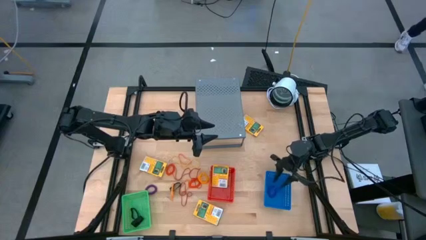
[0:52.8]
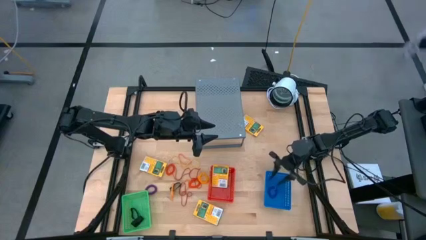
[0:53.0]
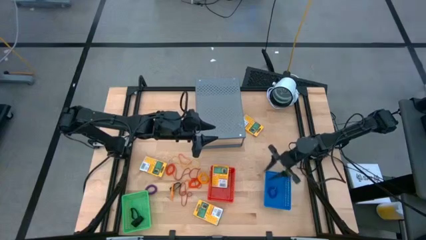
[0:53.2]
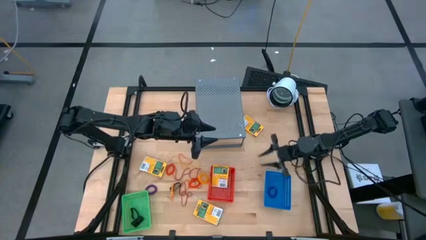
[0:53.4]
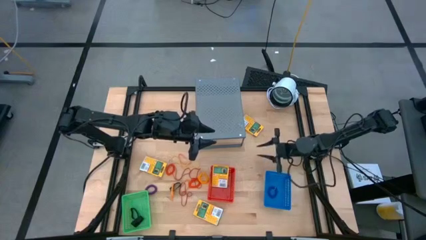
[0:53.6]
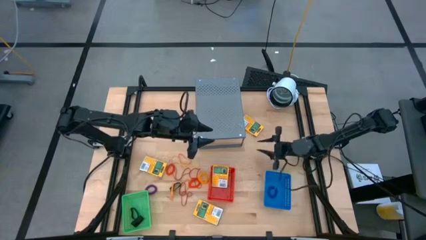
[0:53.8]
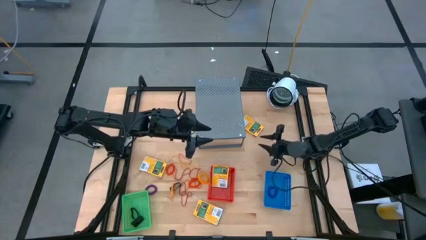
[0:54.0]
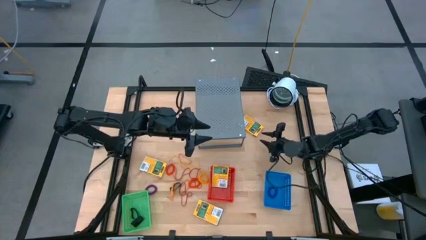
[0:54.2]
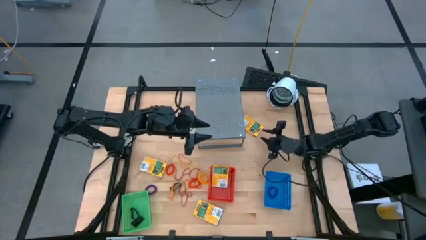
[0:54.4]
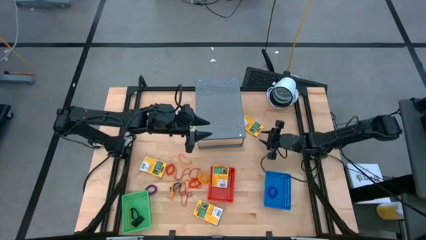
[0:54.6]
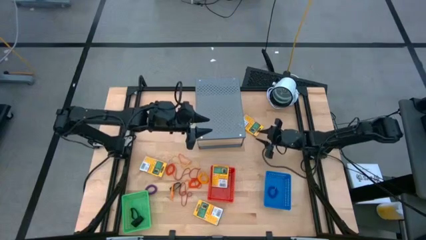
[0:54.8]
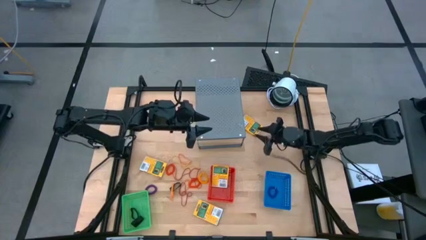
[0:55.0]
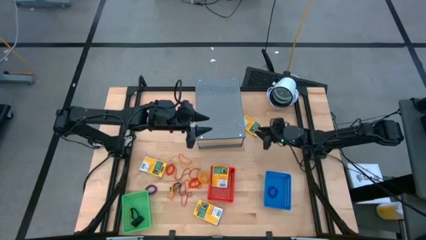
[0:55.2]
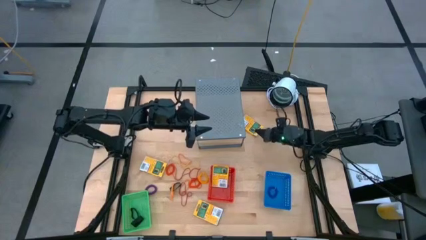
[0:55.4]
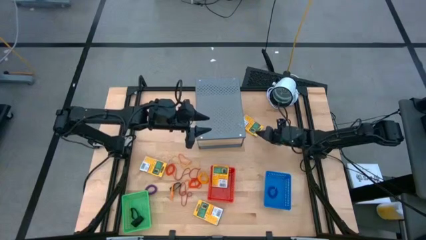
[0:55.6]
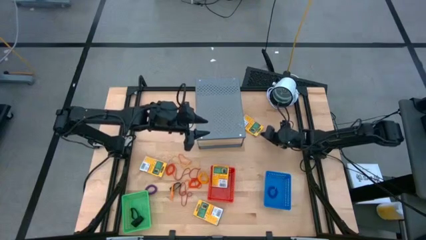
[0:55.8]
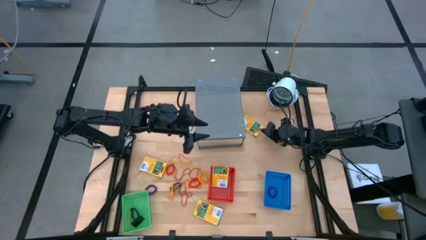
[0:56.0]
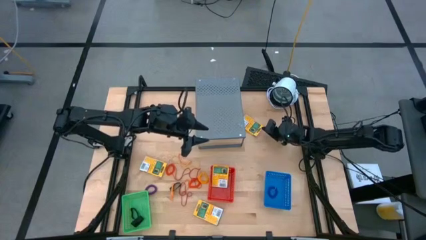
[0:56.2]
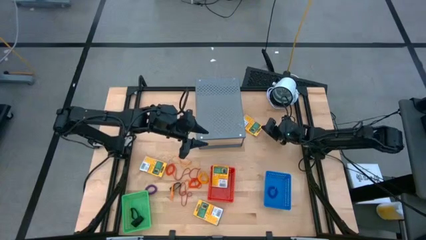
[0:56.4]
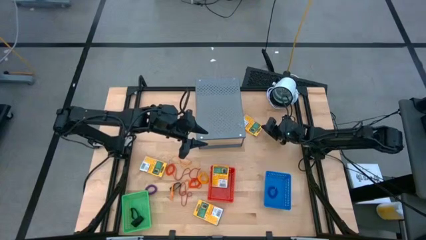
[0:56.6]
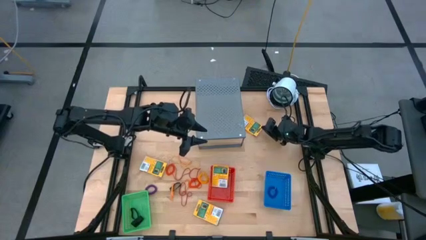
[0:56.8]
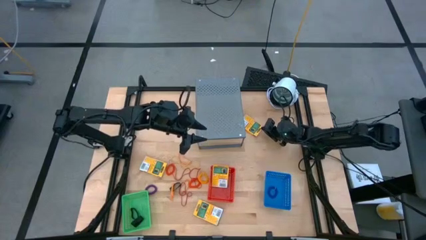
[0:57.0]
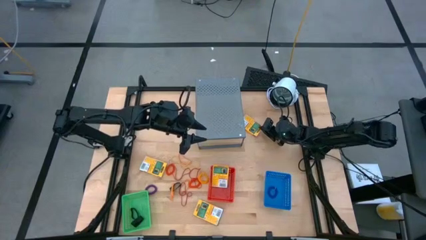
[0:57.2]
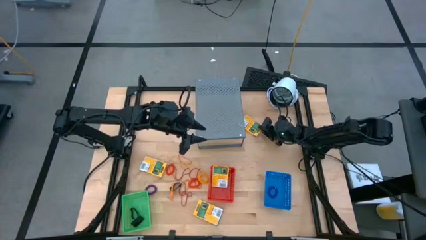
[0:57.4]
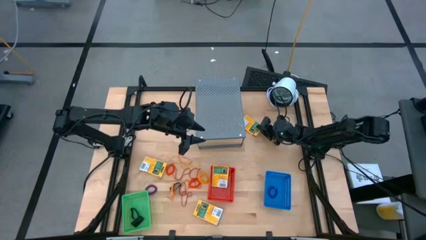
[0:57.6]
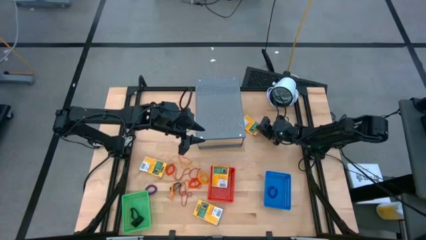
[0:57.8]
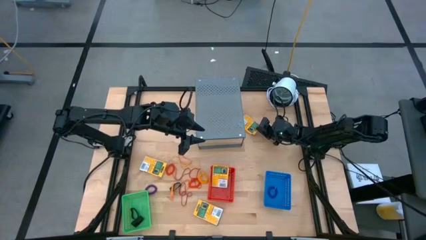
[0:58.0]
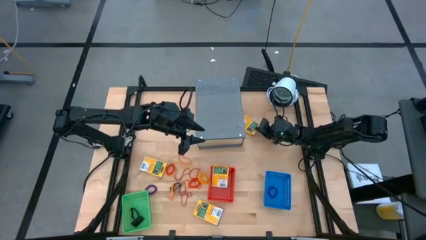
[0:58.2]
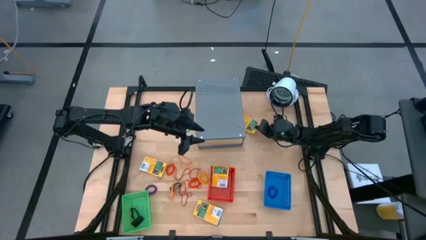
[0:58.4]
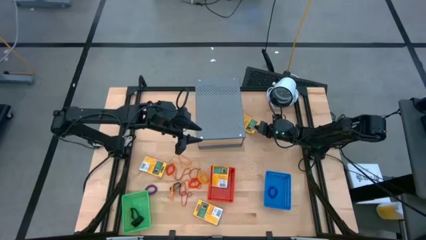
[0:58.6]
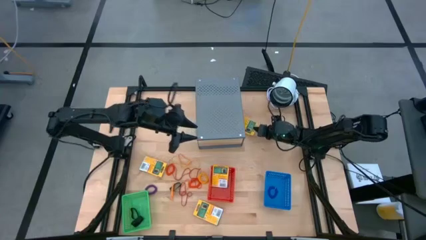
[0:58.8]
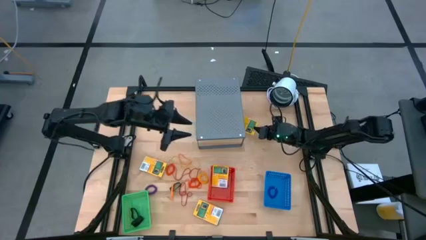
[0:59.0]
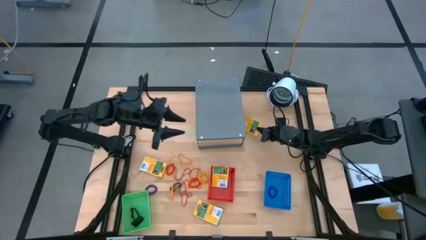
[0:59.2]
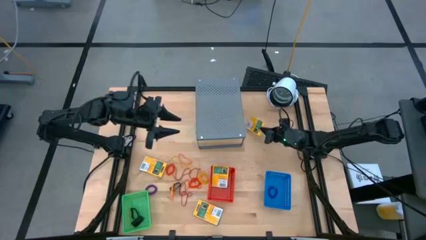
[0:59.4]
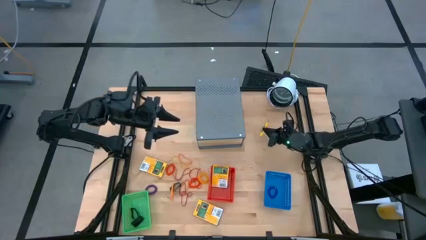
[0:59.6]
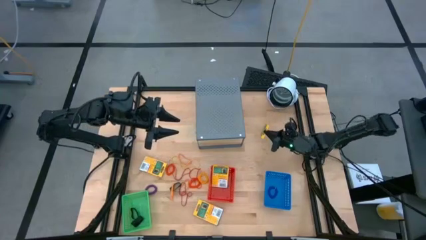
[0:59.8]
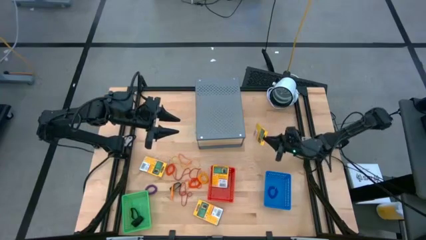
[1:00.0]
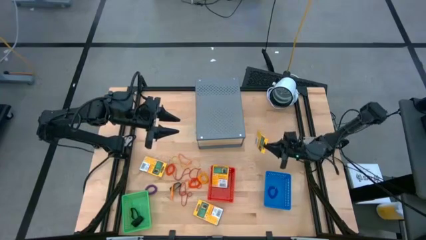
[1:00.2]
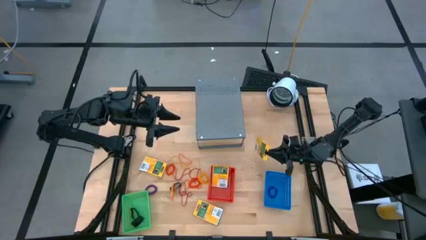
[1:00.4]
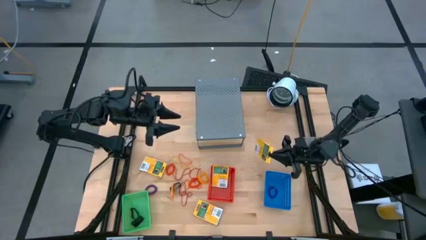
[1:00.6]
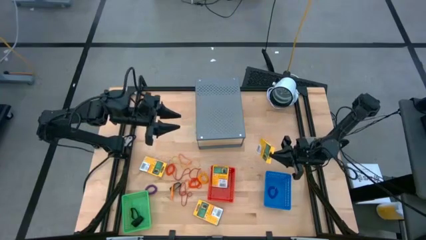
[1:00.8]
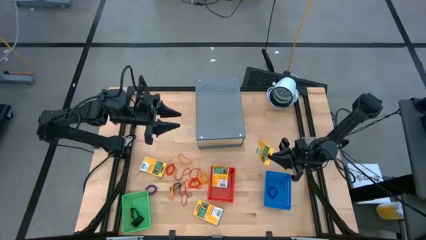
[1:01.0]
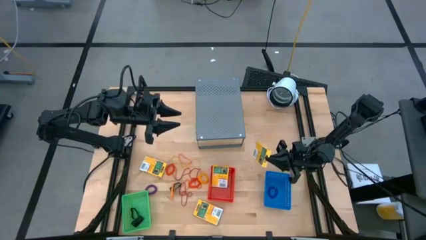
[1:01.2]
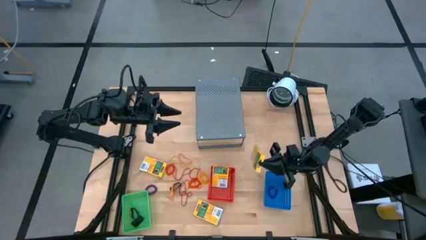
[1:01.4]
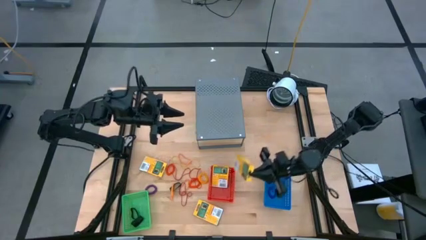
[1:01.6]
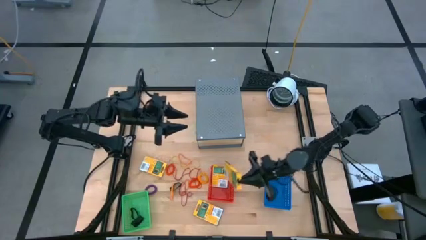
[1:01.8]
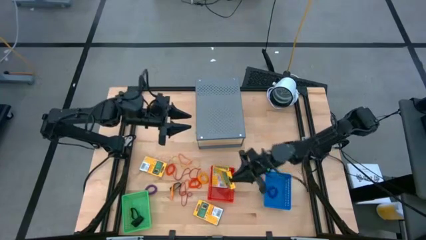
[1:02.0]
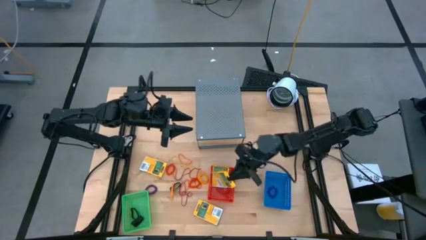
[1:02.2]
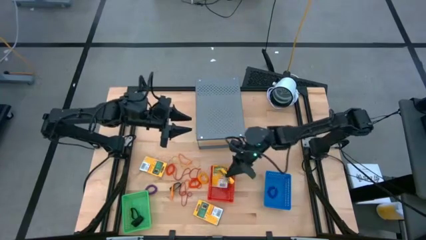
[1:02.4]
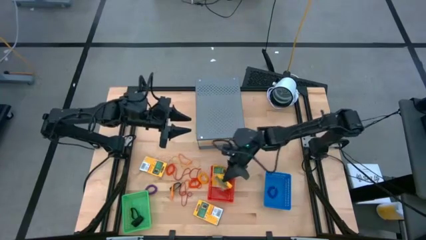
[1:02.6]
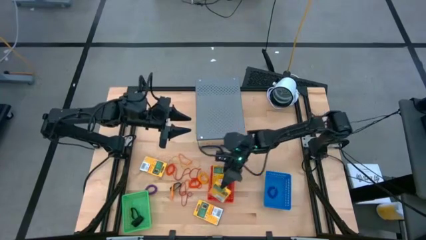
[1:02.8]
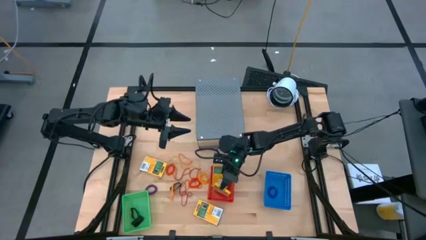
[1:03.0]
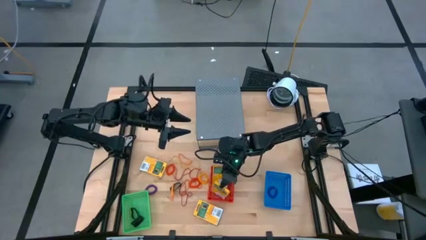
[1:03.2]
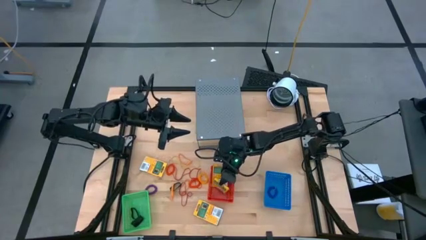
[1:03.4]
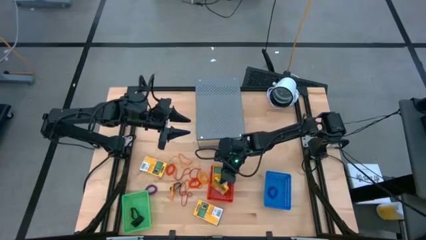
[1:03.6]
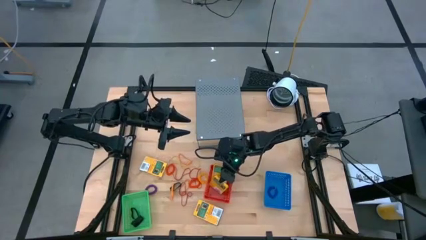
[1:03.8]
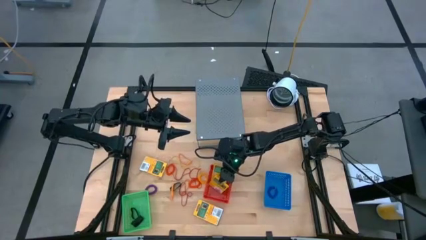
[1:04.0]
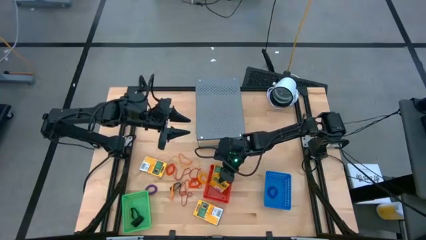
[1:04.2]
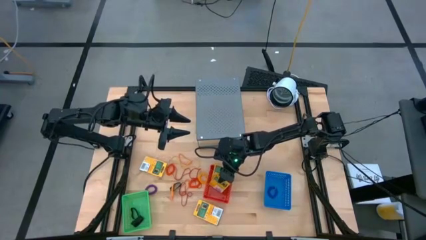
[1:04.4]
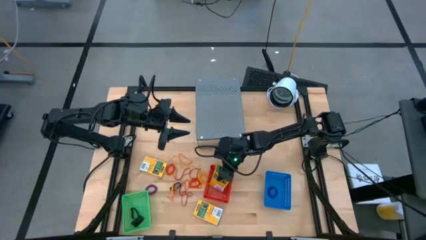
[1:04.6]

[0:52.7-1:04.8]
Task: Pick & Place Office Desk Supplies
Put the yellow crayon box into the red bin

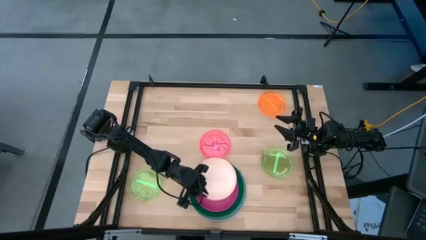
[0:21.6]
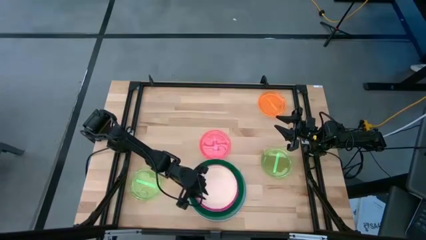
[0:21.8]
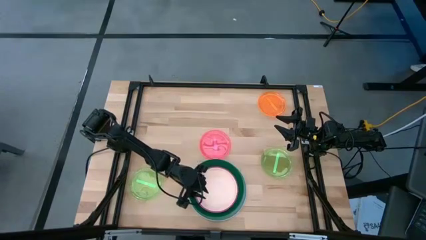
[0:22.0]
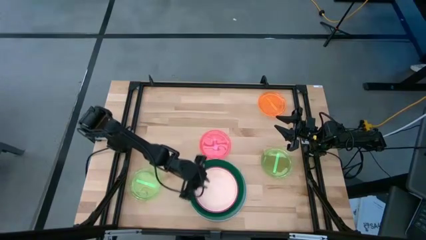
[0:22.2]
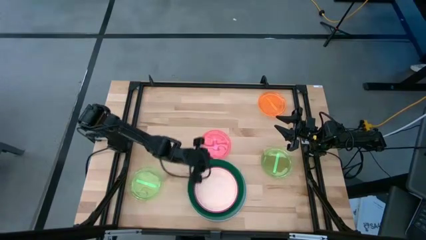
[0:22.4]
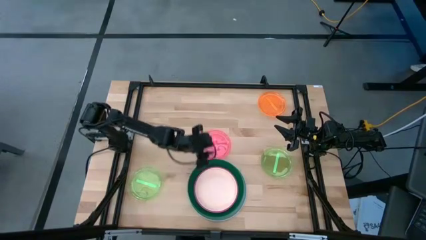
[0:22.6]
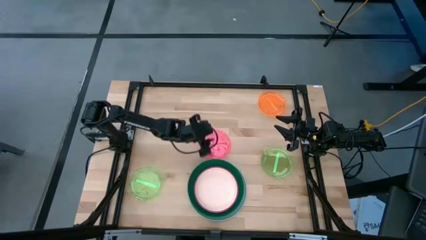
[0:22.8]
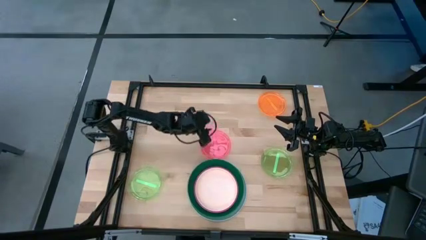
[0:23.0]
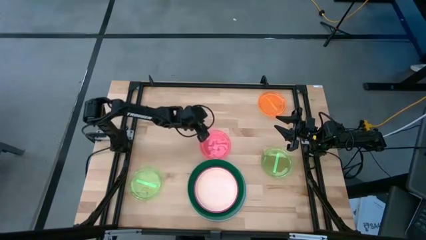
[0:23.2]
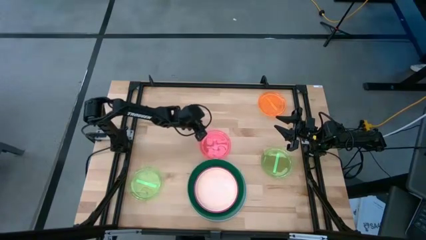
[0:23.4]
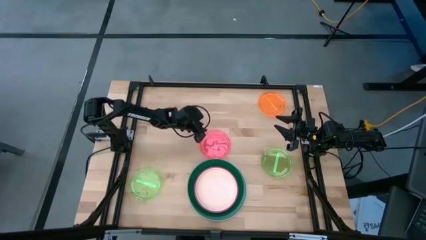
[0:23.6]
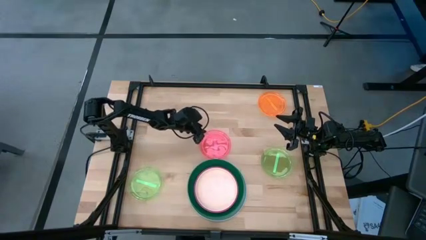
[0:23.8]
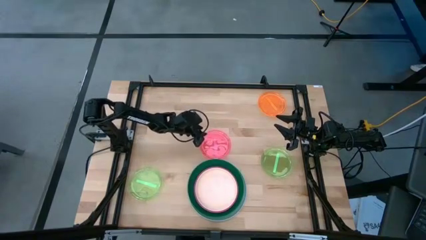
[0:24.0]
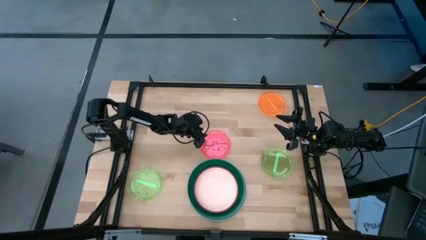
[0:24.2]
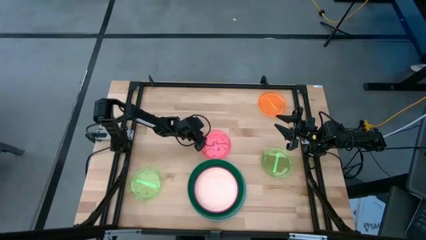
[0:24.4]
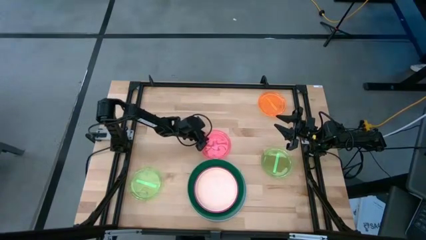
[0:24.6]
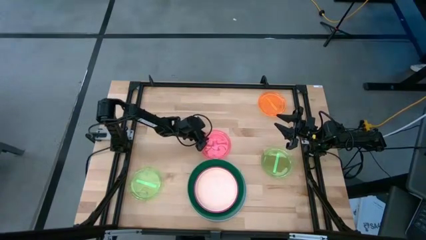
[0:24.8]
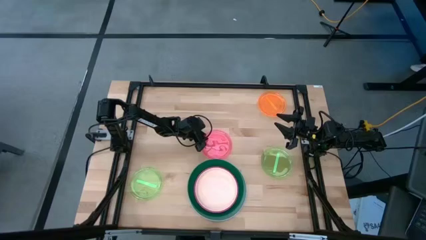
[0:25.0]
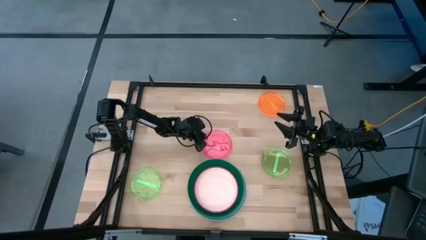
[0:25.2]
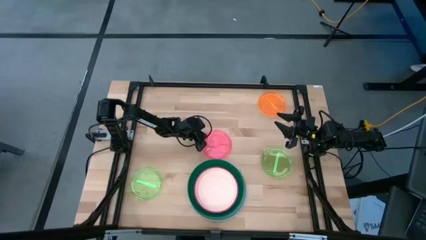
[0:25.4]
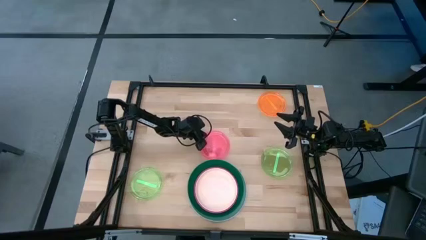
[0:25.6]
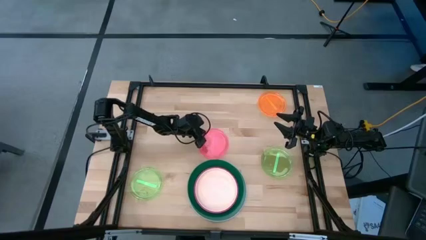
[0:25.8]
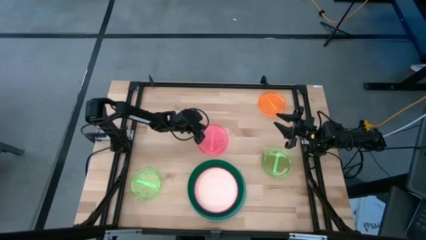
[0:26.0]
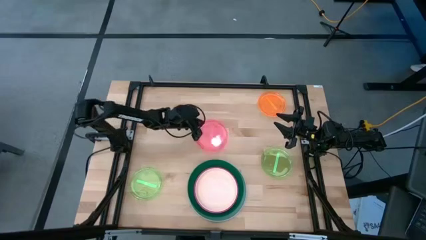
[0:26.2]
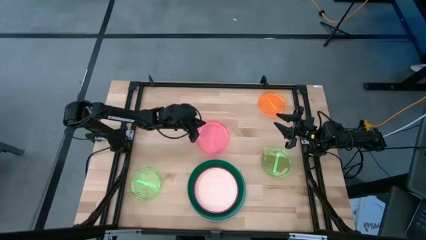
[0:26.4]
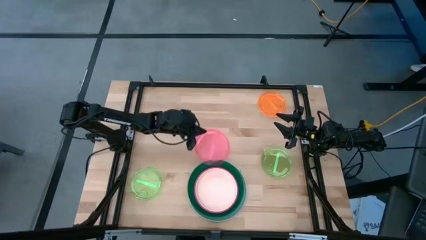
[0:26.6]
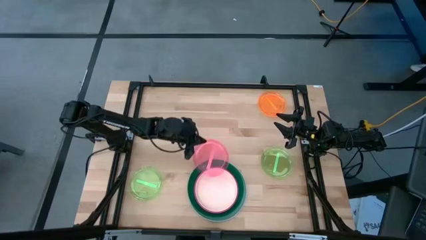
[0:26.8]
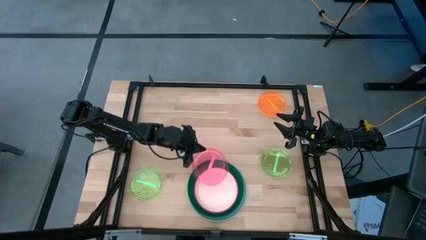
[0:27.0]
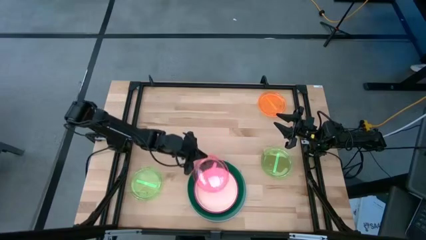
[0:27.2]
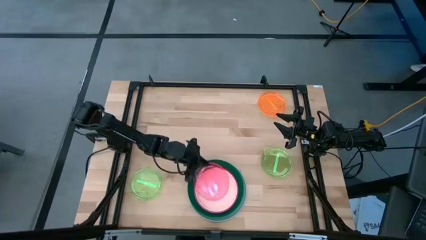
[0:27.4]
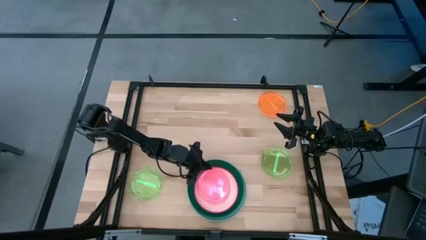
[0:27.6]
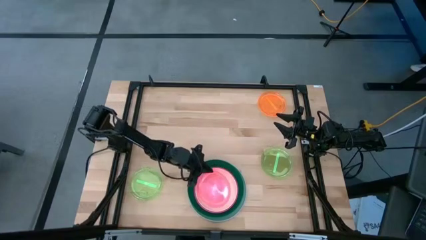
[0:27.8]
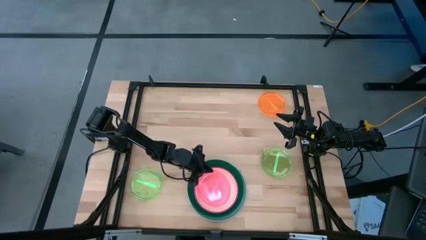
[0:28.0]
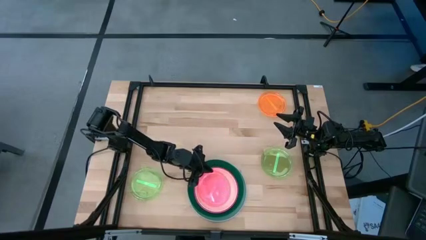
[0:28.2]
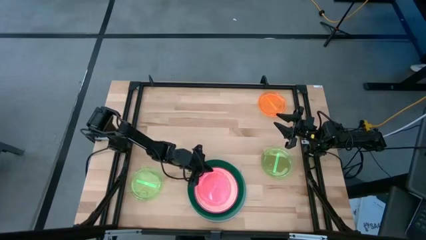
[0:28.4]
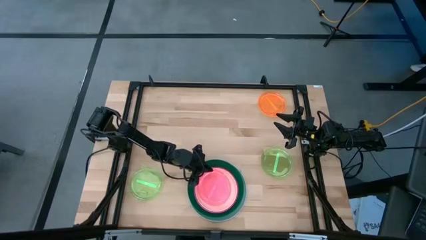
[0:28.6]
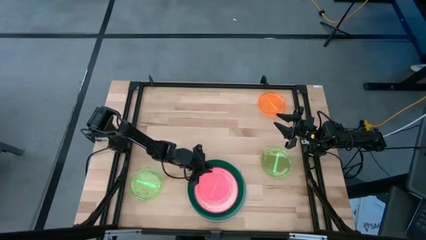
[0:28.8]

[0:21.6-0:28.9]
Task: Stack plastic plates
Stack the transparent pink plate on the cream plate
